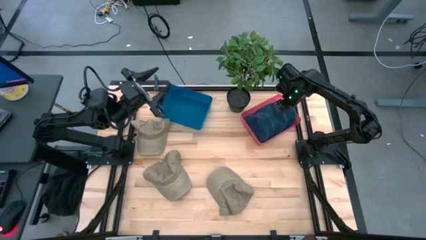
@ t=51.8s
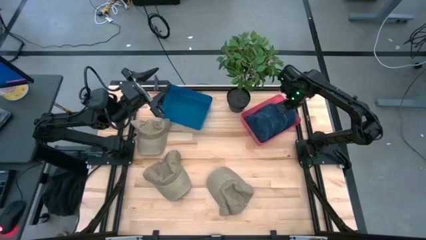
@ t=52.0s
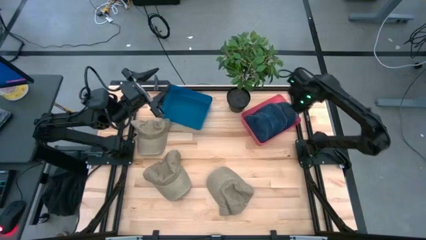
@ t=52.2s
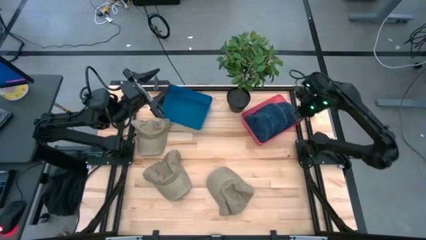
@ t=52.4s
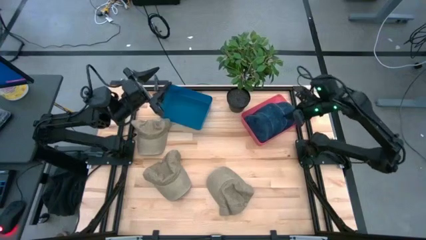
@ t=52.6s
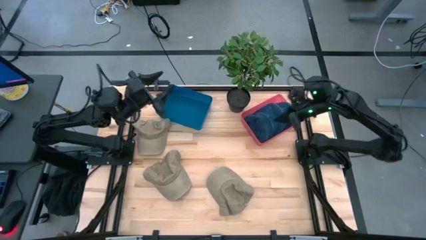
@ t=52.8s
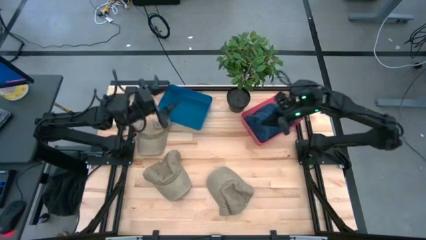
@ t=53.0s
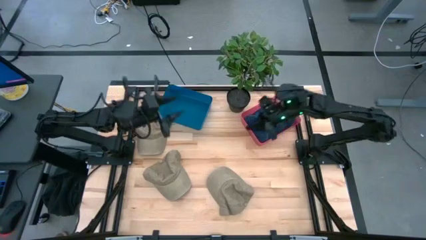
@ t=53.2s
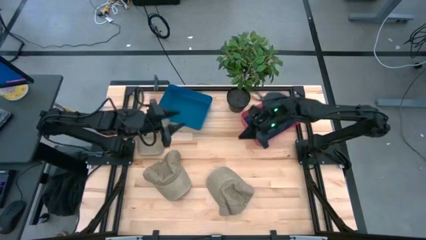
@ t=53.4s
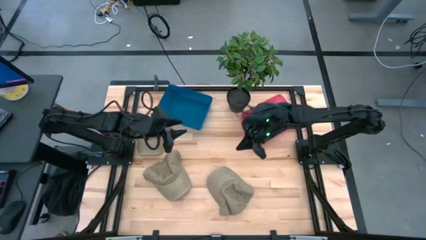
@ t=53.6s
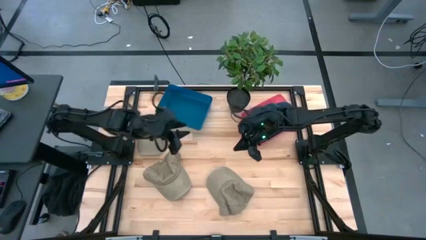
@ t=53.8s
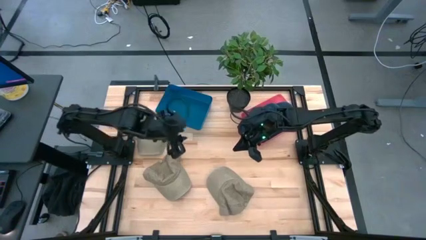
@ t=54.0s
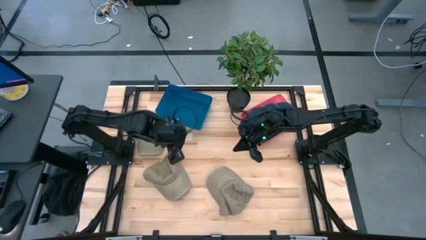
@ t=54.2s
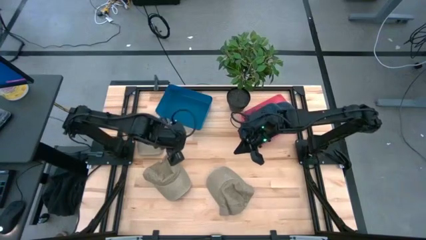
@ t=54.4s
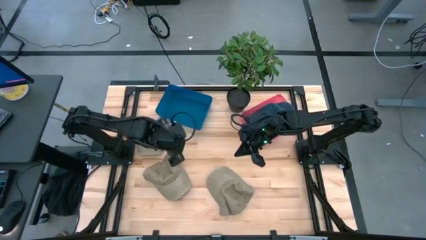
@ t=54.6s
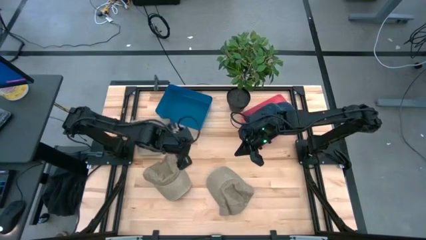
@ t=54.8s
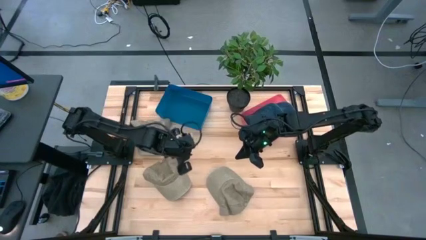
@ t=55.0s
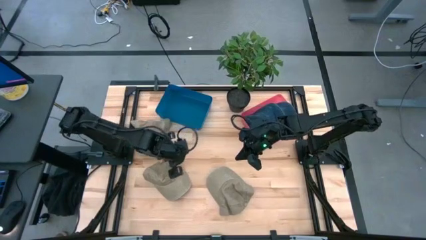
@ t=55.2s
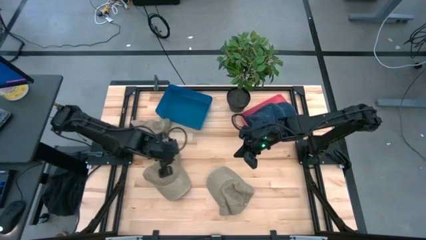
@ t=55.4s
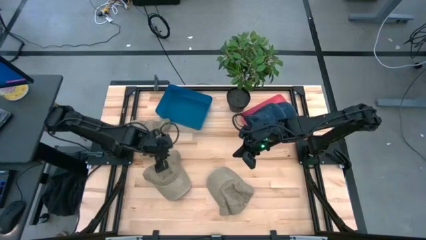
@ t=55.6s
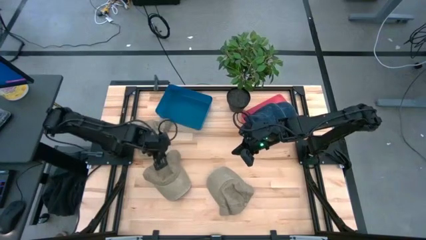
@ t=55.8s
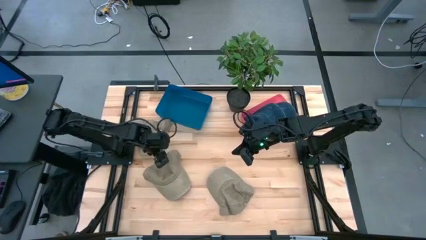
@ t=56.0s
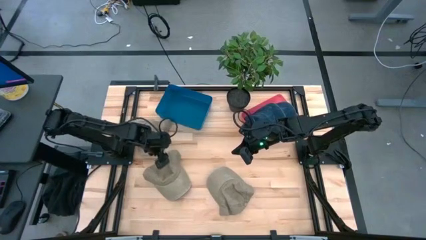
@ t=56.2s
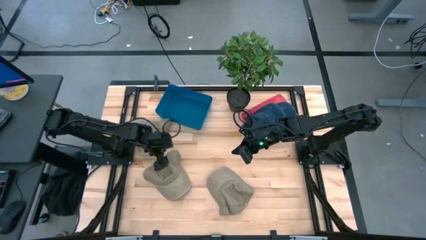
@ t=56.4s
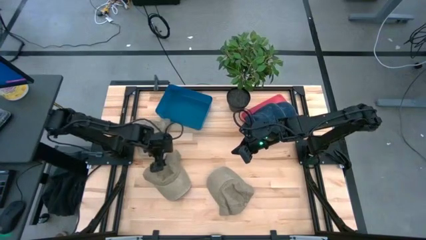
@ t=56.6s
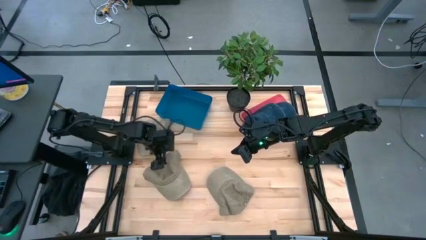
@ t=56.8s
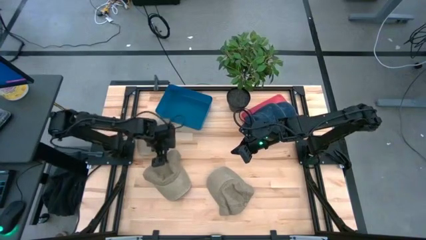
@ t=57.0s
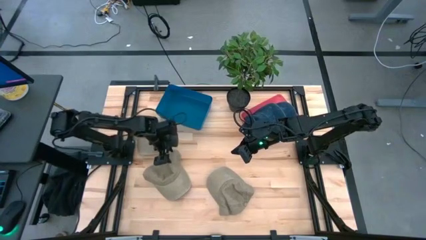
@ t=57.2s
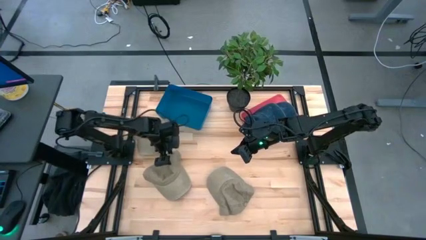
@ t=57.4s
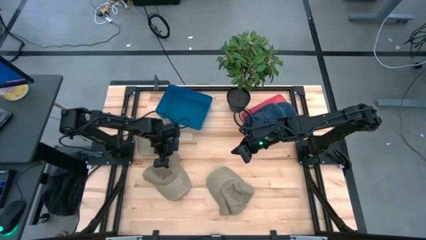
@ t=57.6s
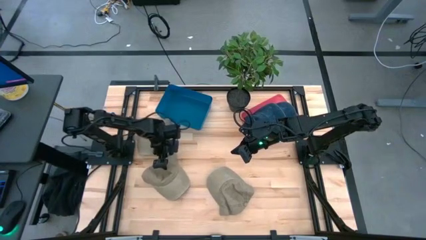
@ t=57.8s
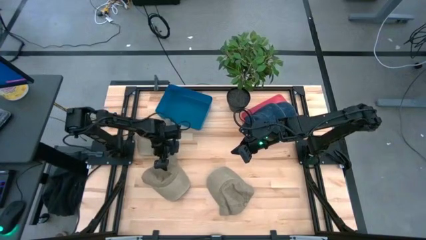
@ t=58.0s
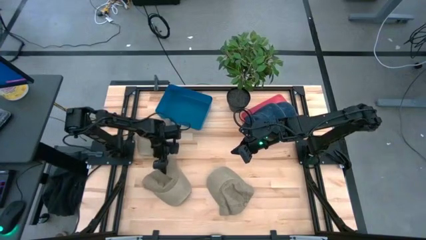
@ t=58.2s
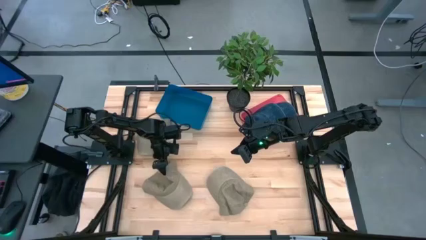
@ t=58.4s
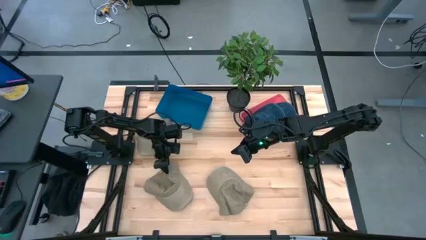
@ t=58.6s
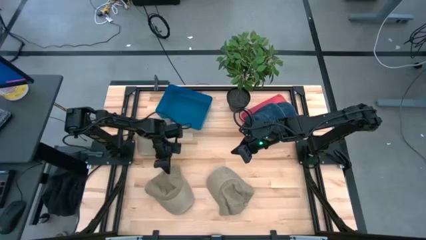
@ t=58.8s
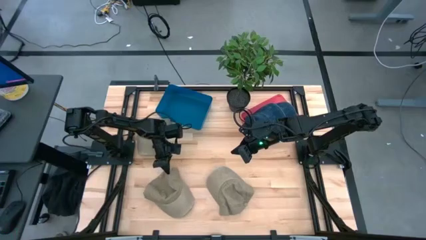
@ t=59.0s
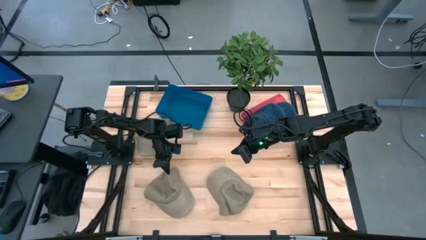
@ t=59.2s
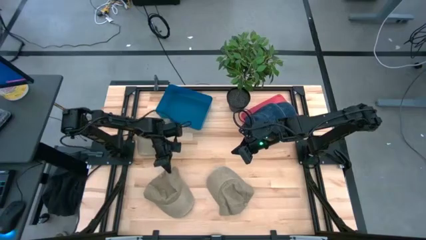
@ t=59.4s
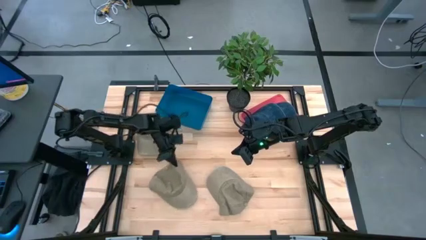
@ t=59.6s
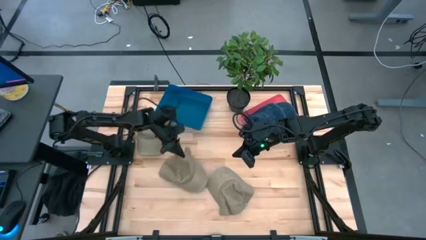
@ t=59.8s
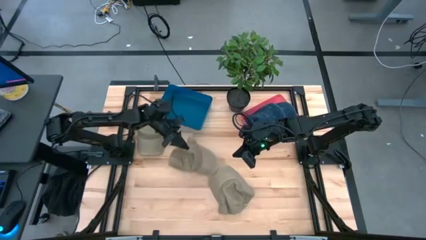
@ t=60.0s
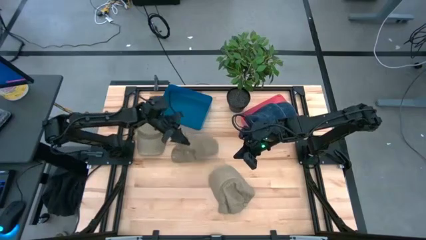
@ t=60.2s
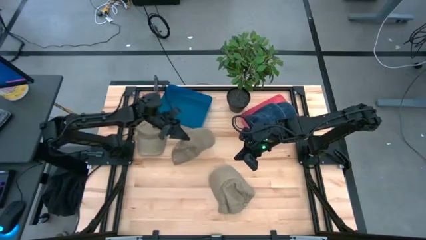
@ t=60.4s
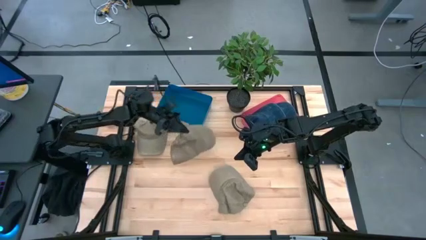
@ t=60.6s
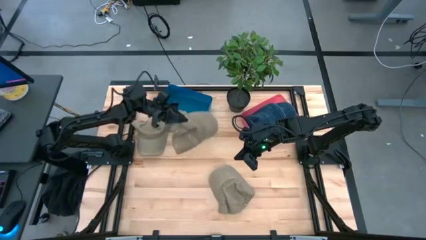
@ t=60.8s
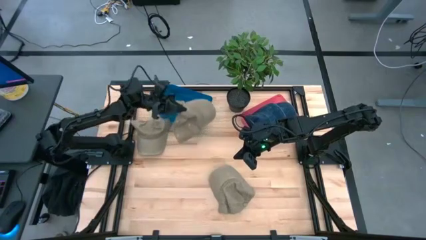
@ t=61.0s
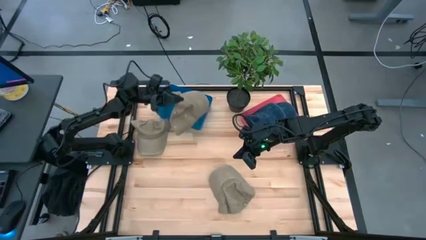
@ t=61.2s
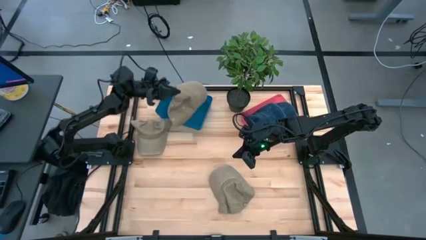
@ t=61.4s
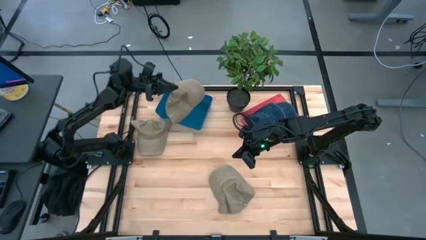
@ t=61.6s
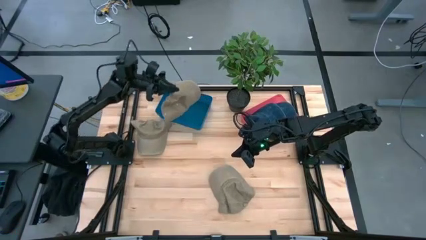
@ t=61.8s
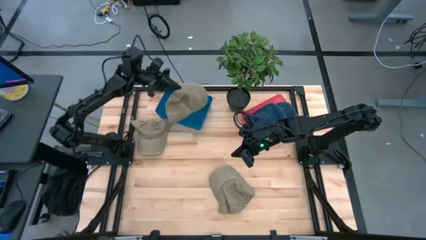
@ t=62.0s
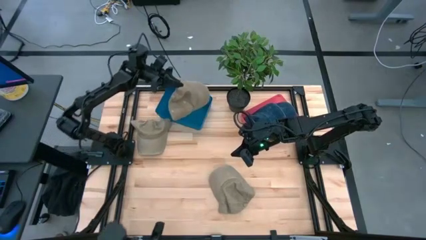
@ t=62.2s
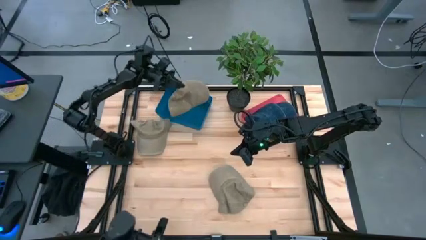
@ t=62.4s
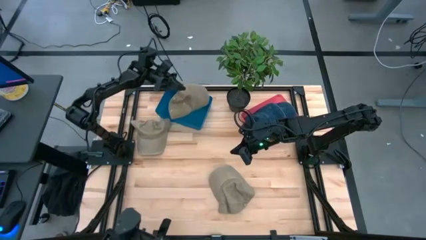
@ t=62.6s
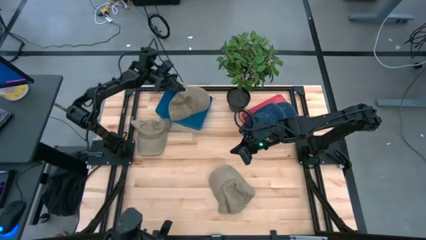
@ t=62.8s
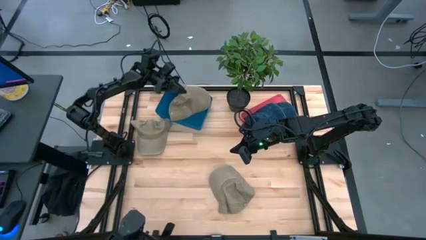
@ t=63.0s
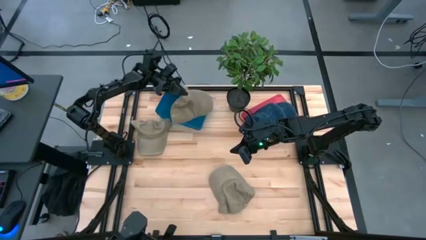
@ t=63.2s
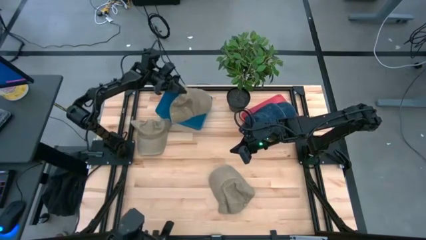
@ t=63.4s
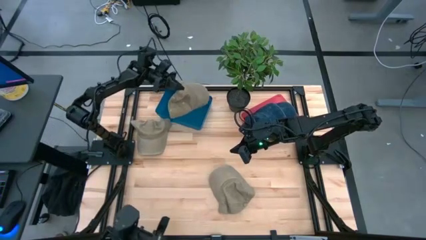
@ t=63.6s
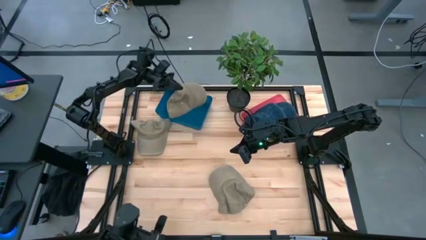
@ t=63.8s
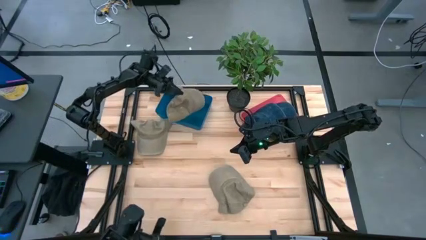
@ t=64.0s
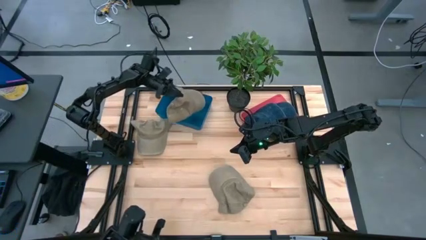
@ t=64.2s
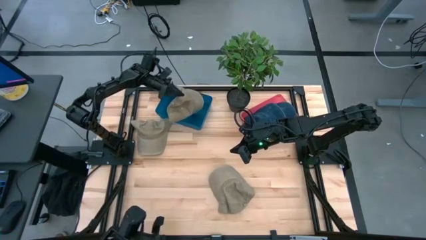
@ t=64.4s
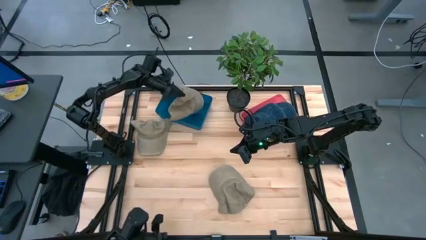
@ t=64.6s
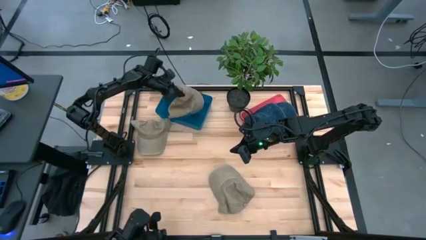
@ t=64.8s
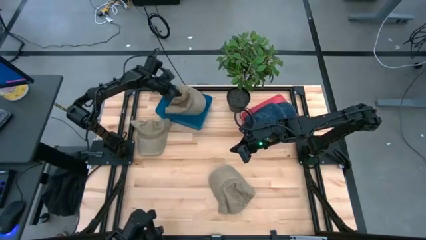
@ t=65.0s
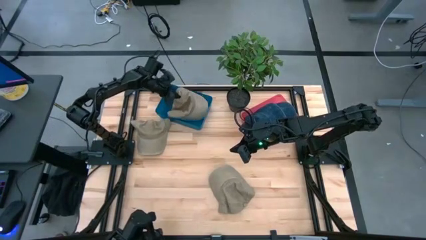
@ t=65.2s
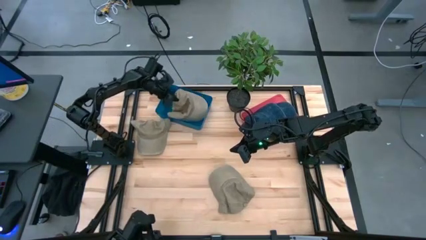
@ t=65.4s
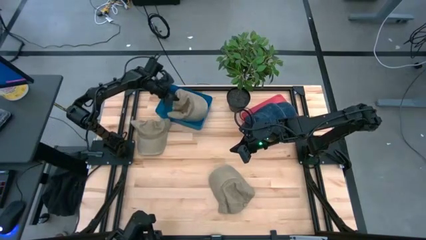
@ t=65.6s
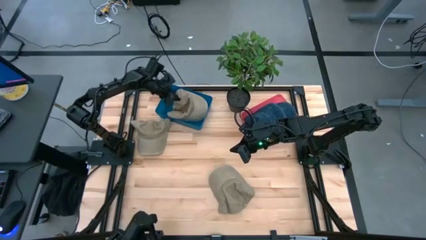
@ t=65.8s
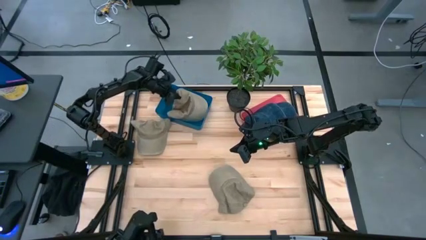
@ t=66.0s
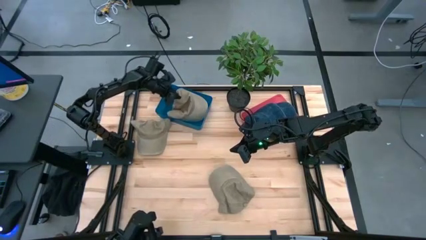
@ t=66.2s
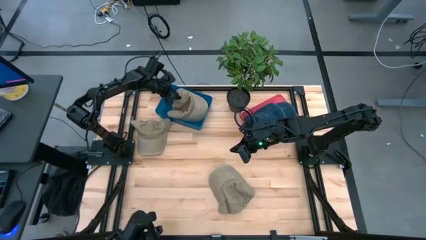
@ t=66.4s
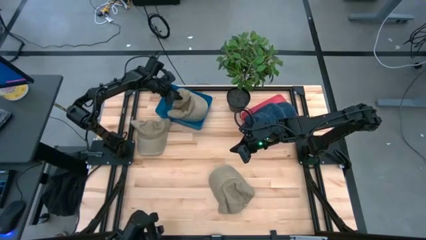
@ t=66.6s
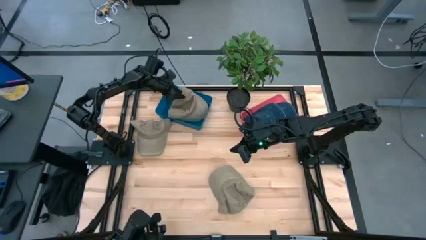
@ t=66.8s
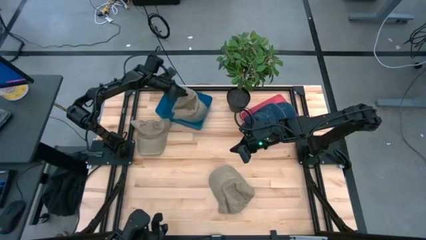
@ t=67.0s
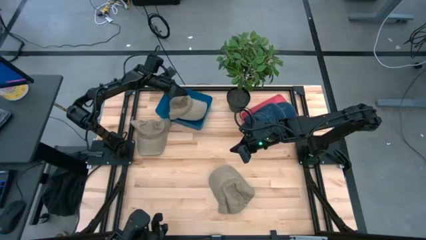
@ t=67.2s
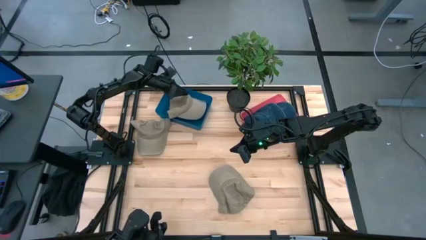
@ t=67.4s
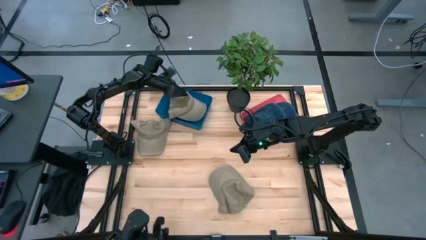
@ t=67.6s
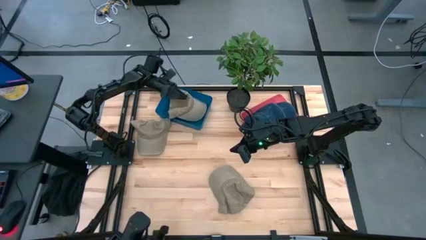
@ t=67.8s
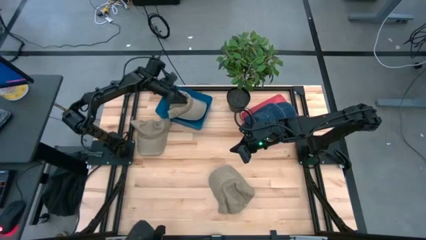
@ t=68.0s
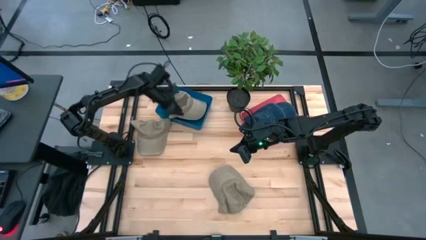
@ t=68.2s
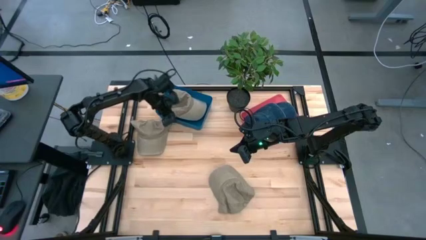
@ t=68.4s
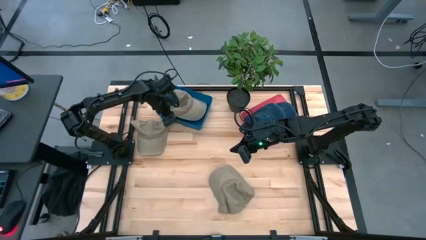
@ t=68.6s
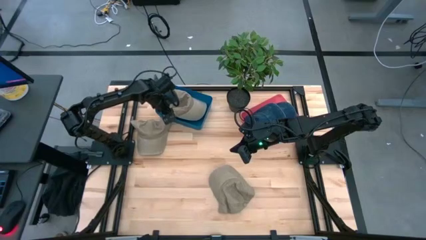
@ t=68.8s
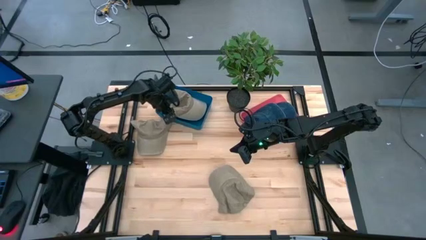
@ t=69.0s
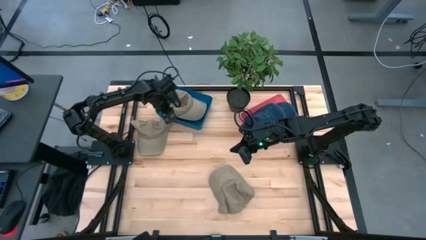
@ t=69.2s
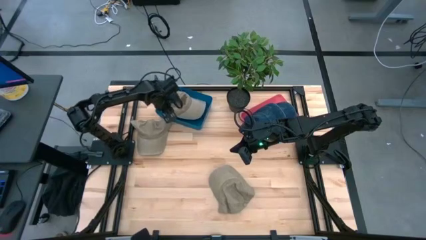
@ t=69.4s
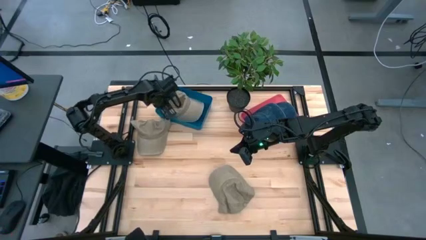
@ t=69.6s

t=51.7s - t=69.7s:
Task: Pick & Place hat
Put the middle brown cap into the blue bin
